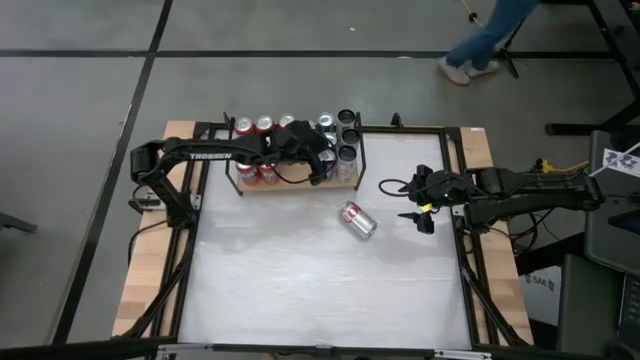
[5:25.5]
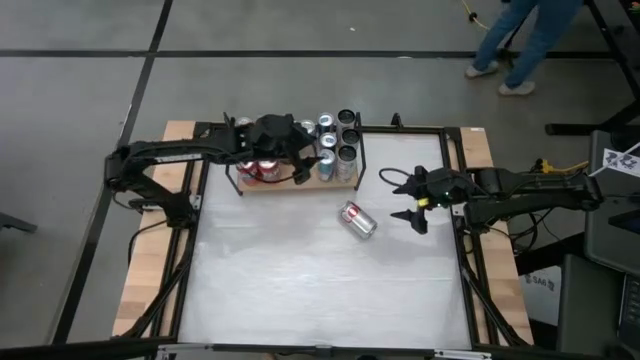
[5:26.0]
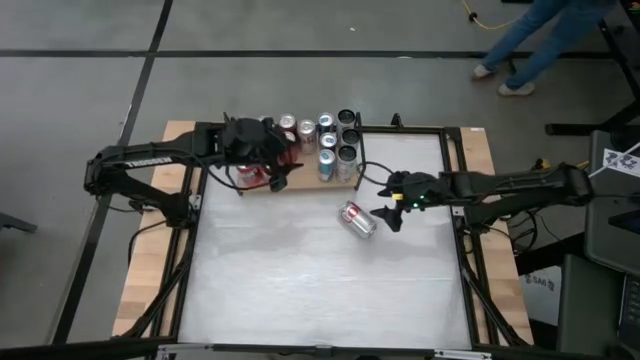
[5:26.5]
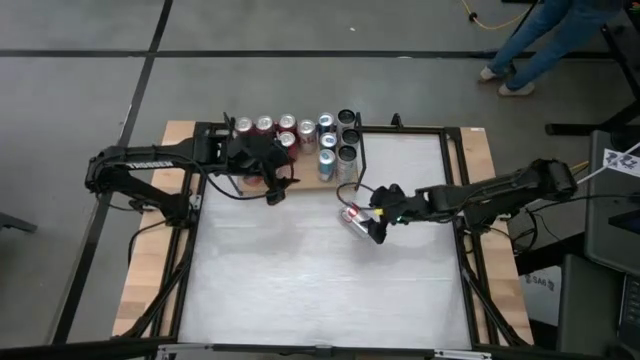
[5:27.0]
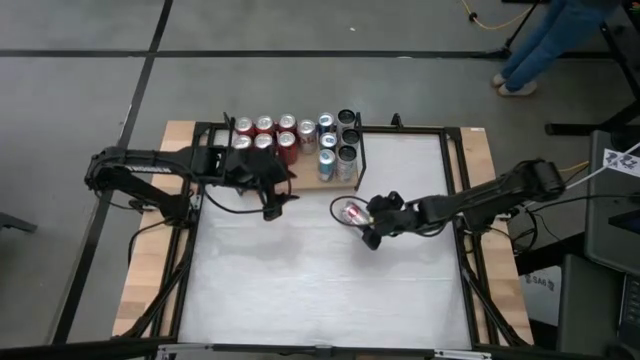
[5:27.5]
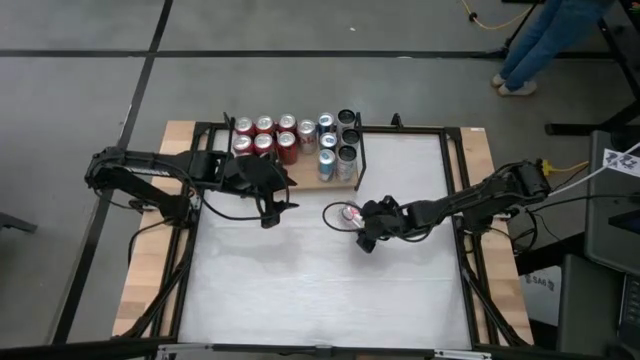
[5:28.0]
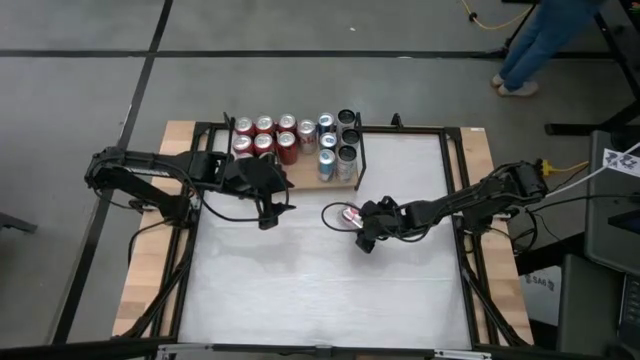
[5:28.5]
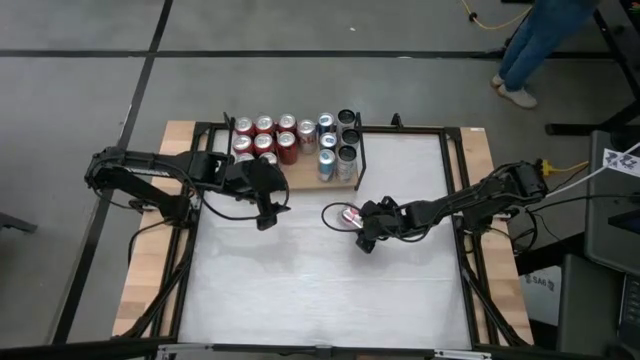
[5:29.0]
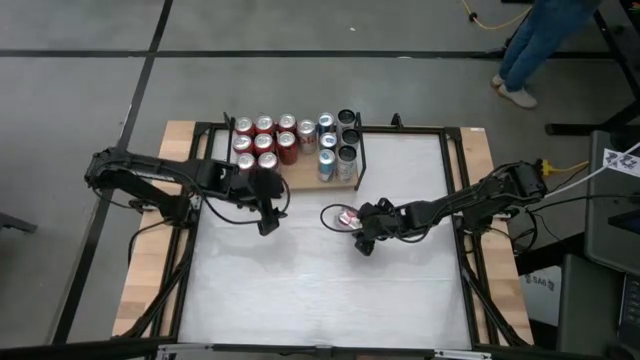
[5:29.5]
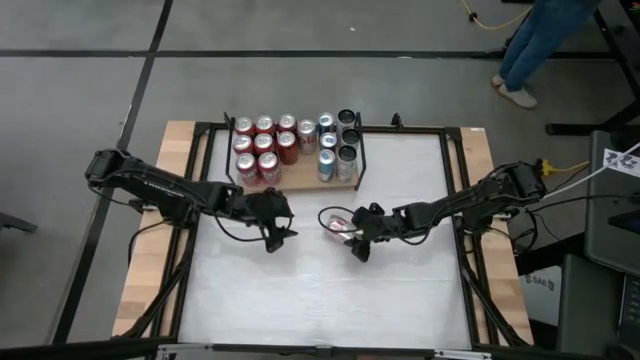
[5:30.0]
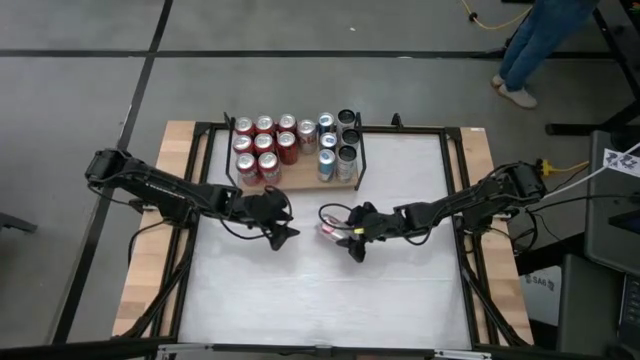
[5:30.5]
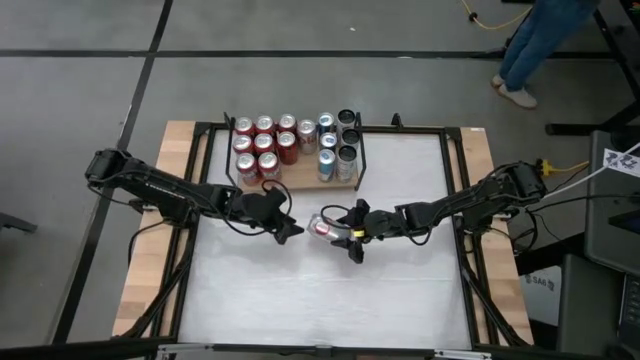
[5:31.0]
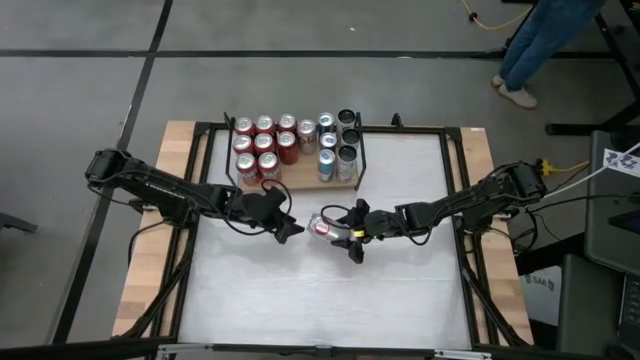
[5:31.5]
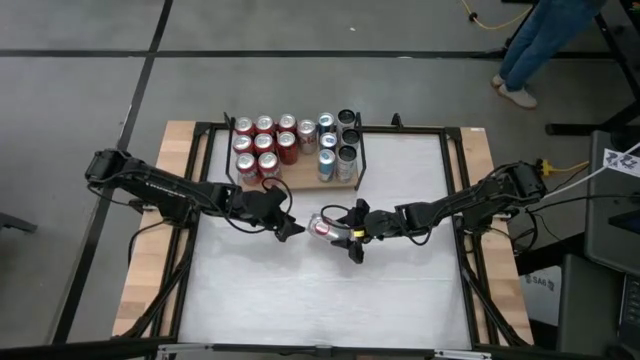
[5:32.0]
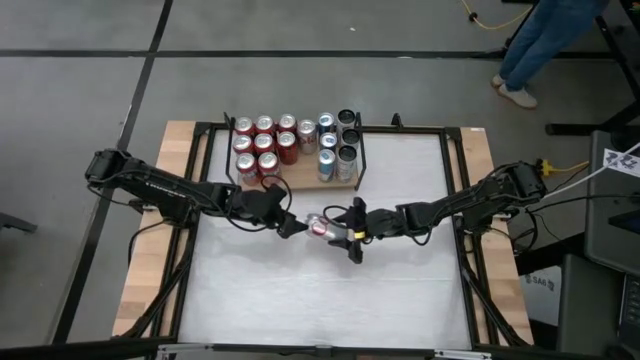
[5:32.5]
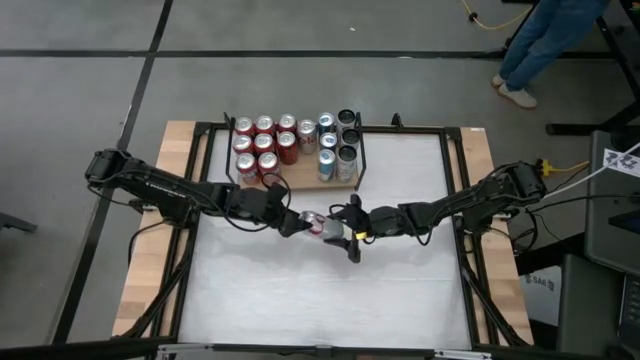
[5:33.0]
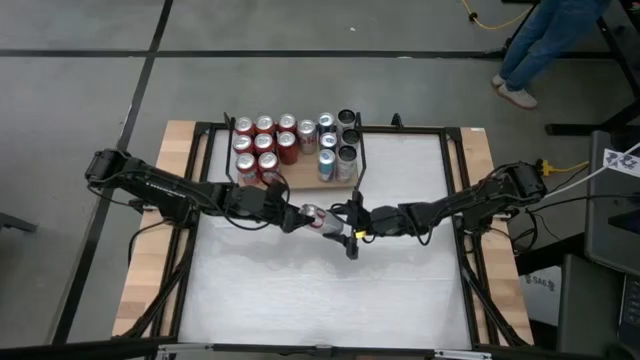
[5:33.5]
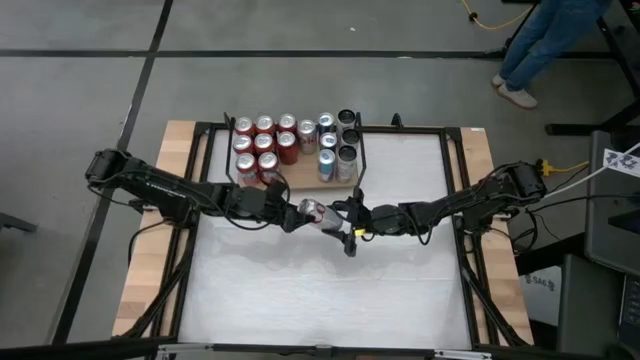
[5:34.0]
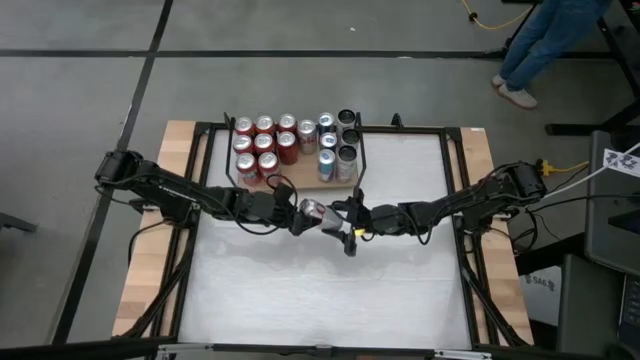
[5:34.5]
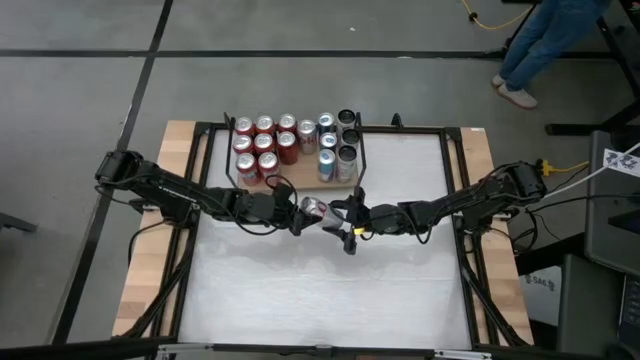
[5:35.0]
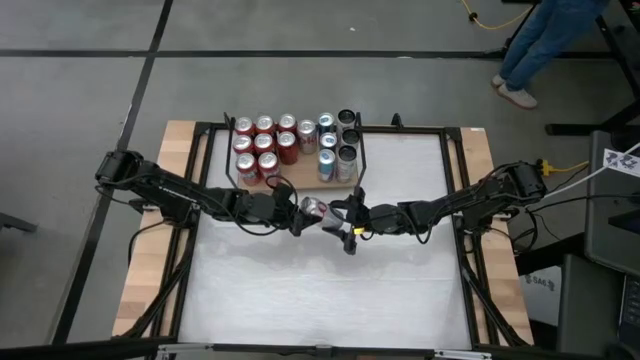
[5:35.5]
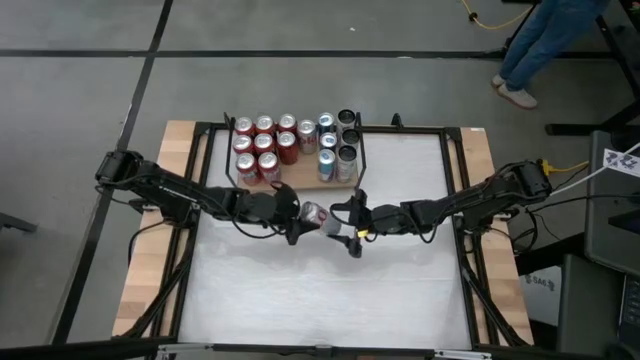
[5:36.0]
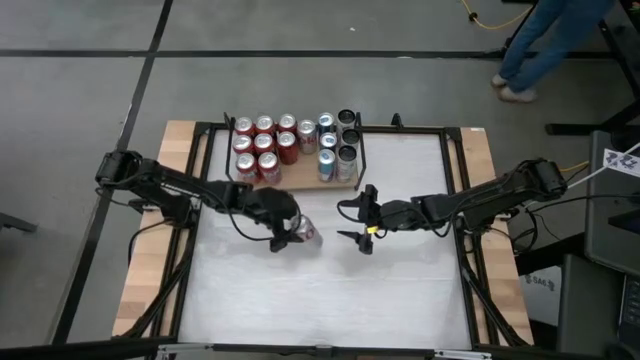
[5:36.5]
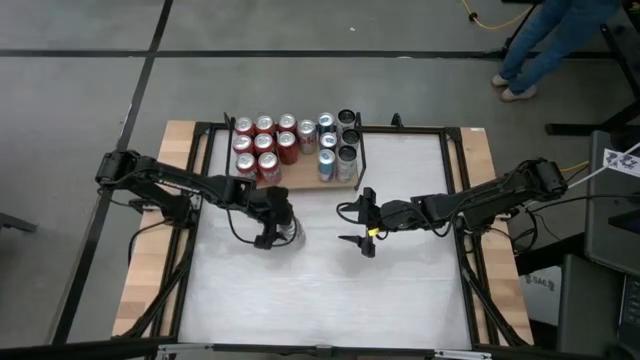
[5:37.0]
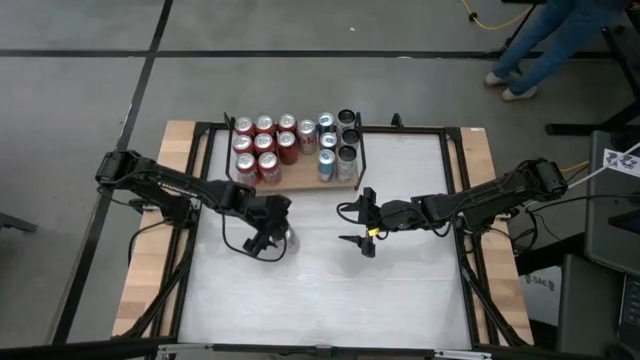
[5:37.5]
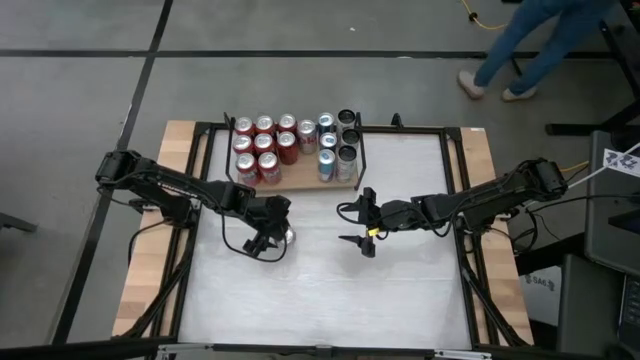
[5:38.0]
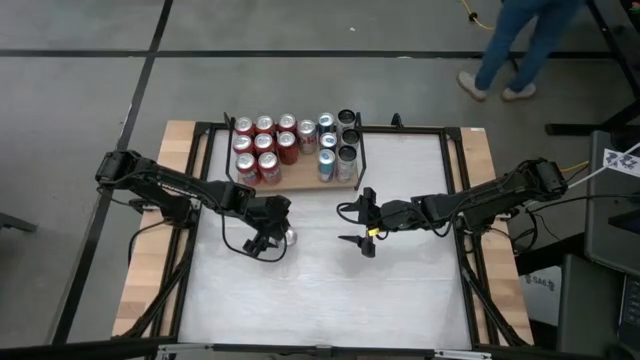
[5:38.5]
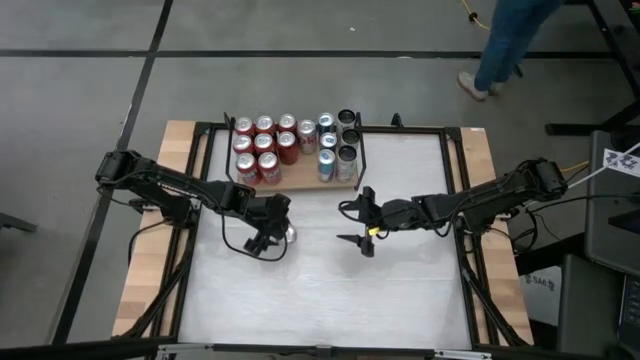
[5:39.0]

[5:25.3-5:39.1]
Task: Place canned beverage on shelf
Put the red silver soda can on the shelf aligned with the other red silver soda can

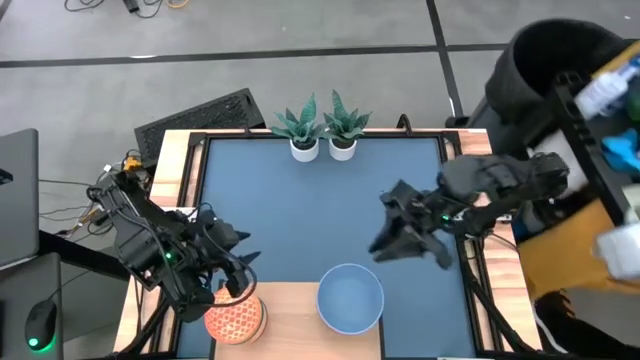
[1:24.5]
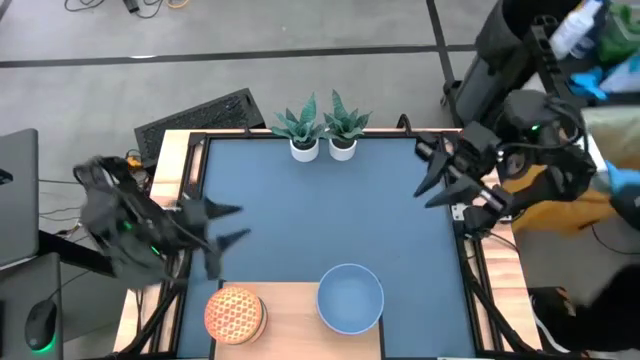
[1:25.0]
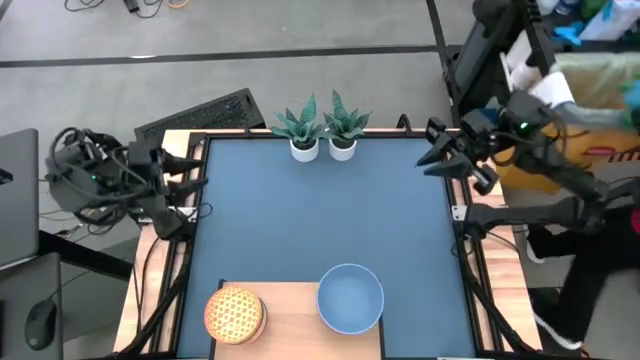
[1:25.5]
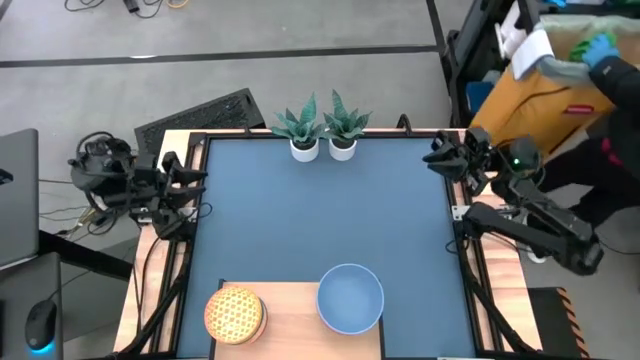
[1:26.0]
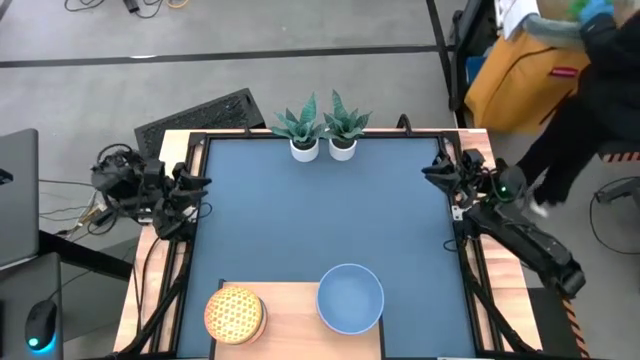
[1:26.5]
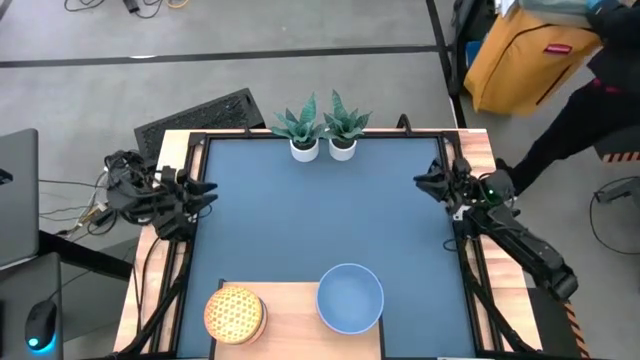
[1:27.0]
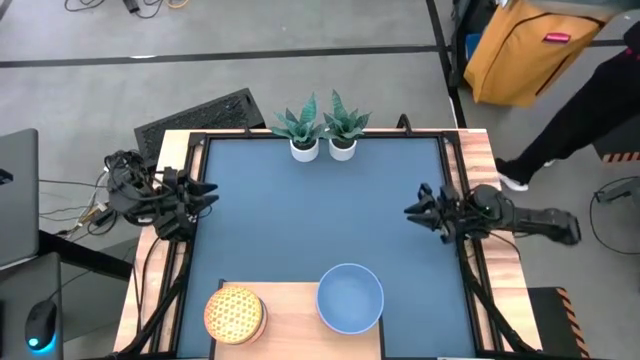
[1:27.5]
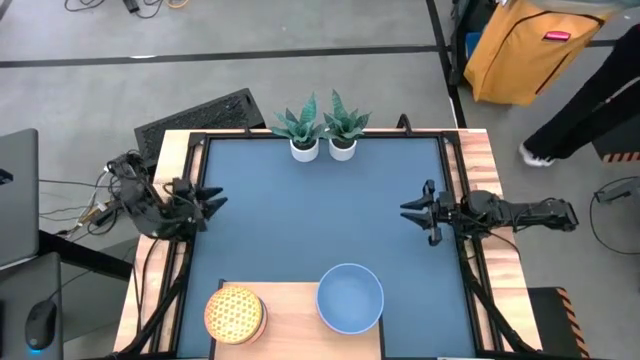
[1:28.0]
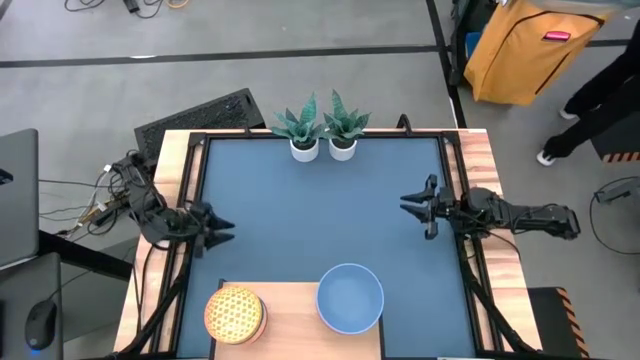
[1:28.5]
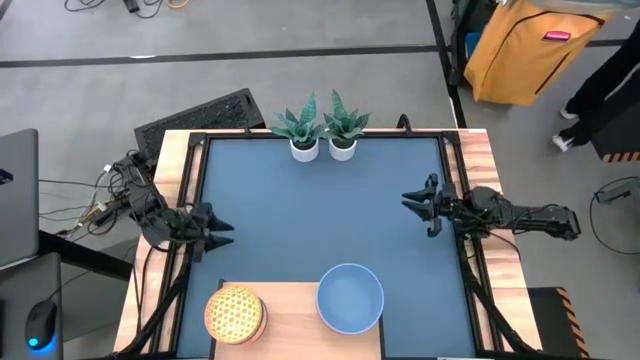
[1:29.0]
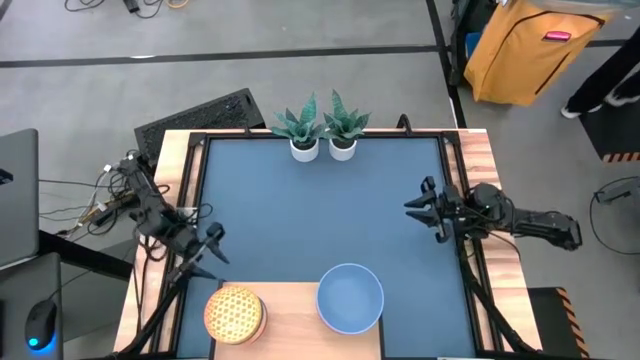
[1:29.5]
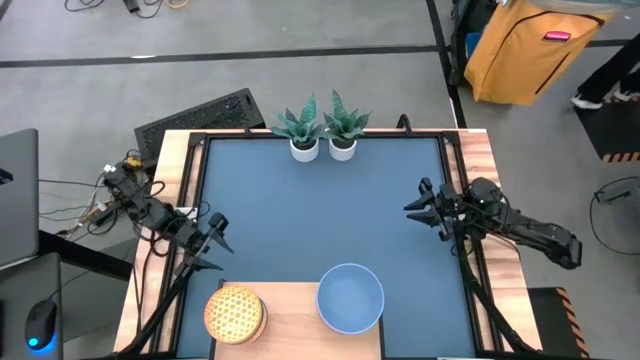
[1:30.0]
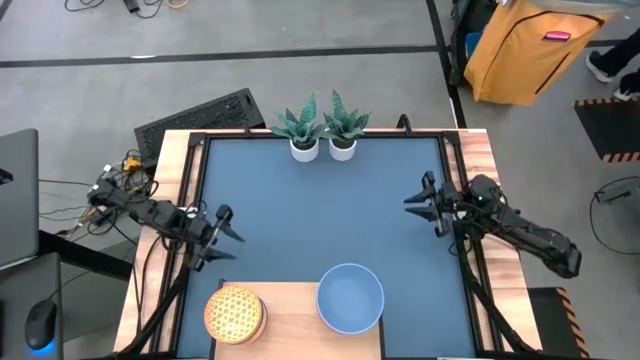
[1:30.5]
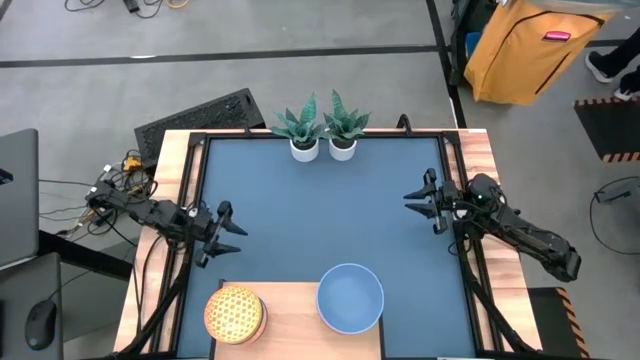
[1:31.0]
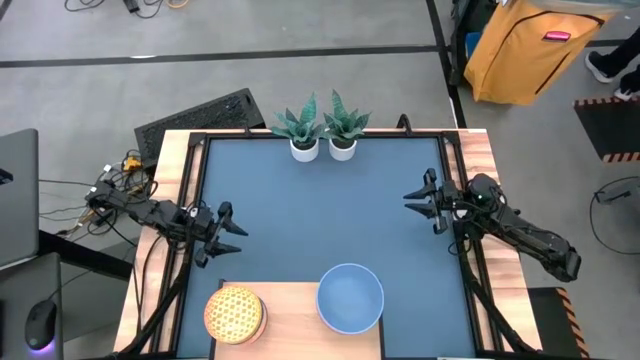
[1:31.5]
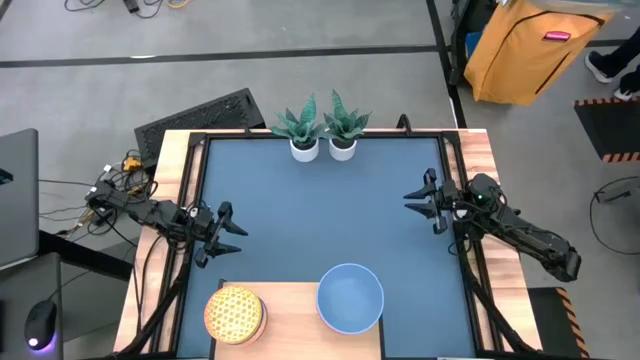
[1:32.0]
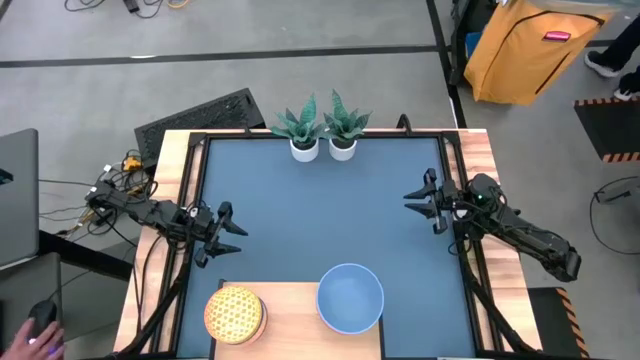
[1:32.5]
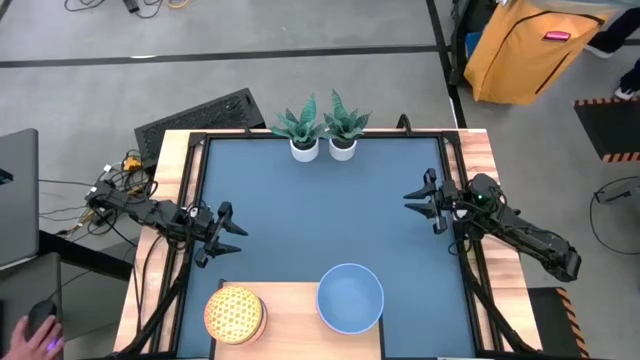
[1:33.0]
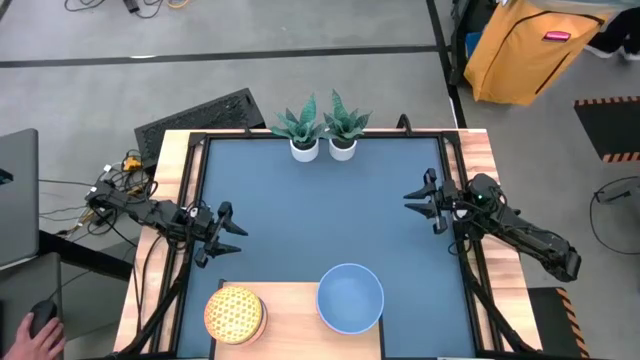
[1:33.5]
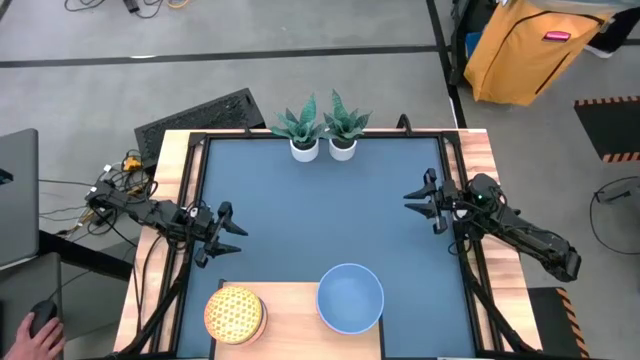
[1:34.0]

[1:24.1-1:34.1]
Task: Place and stack bowls onto a shelf
Return to Home Position
